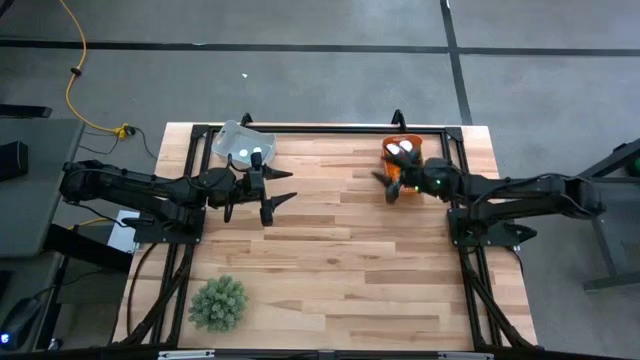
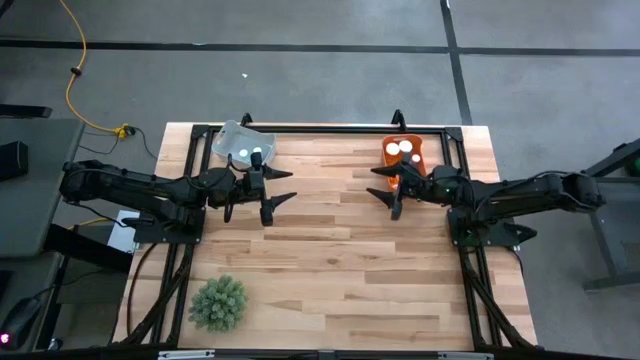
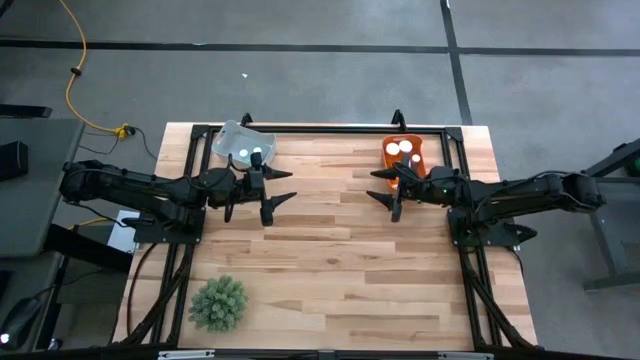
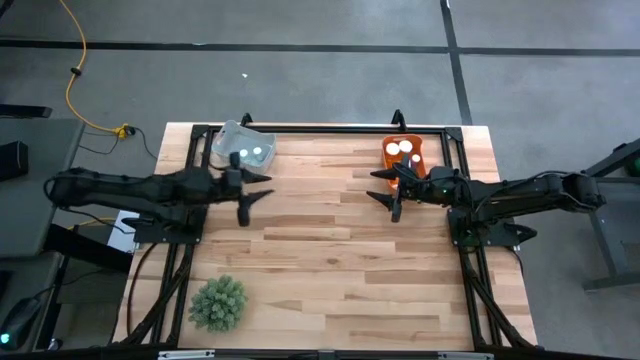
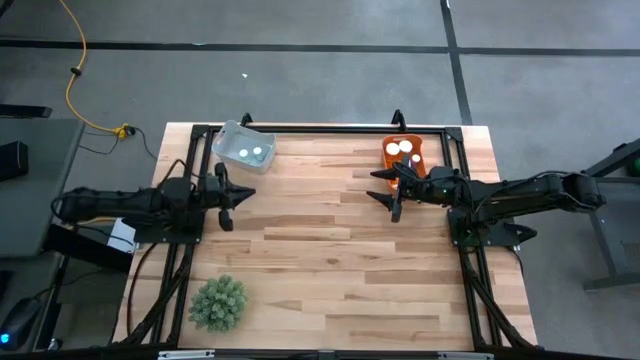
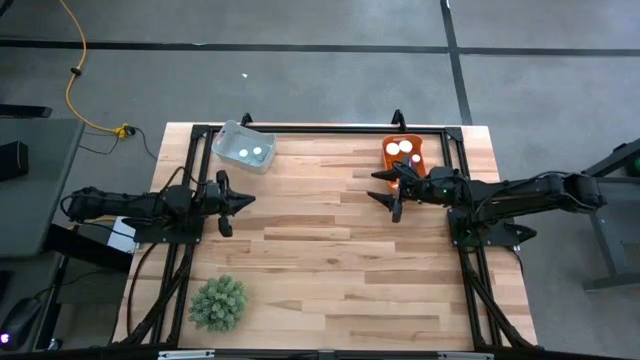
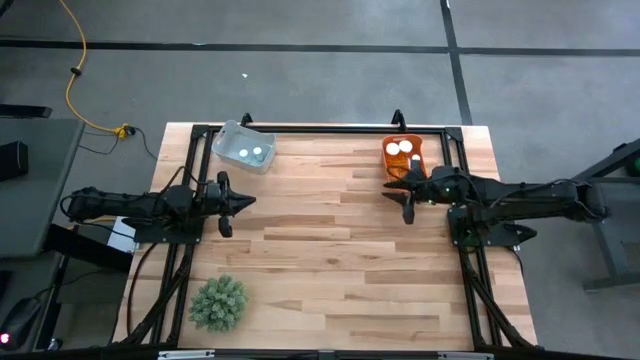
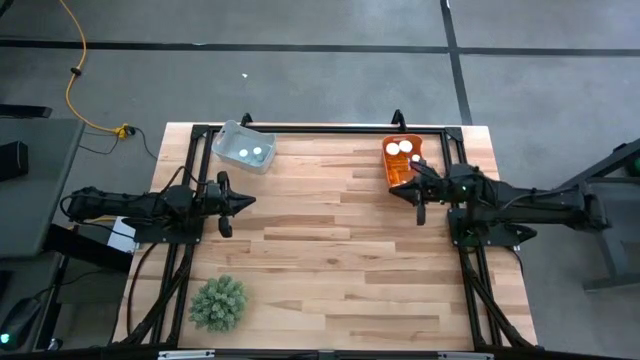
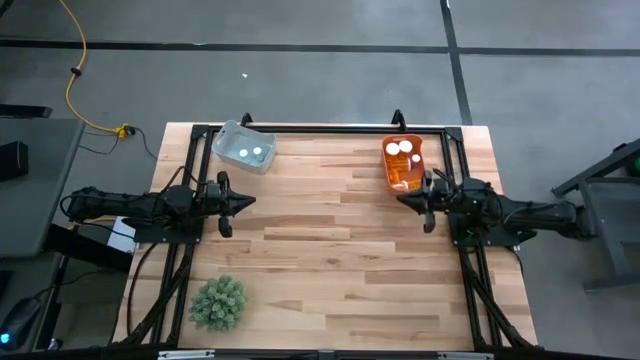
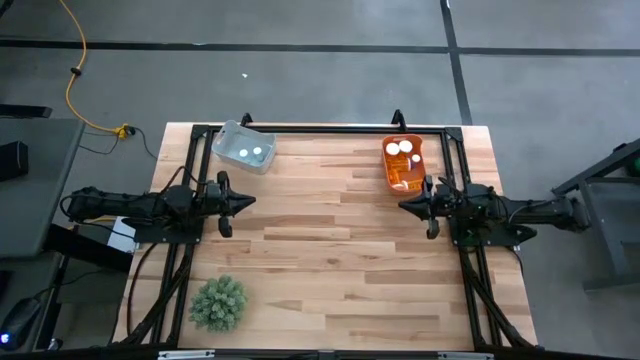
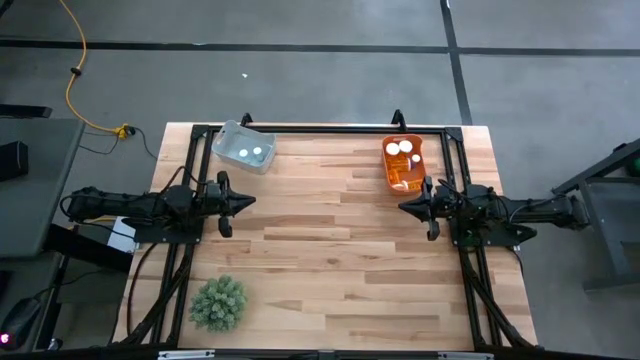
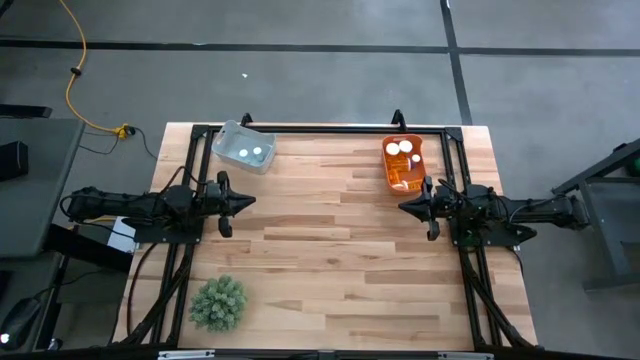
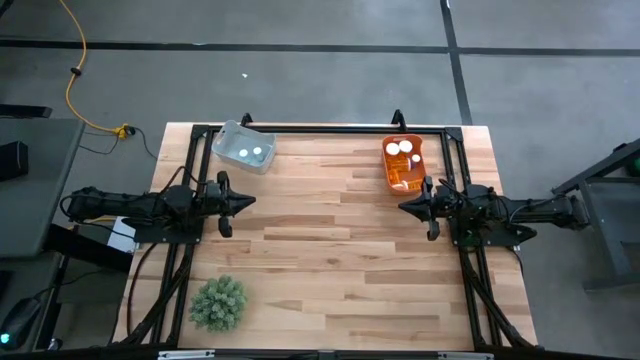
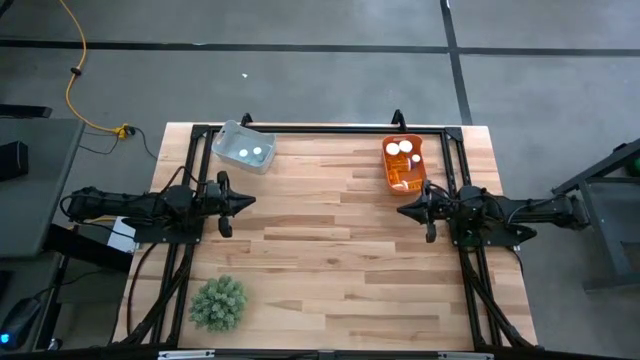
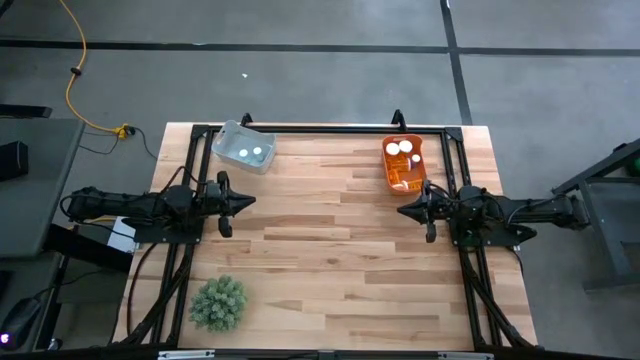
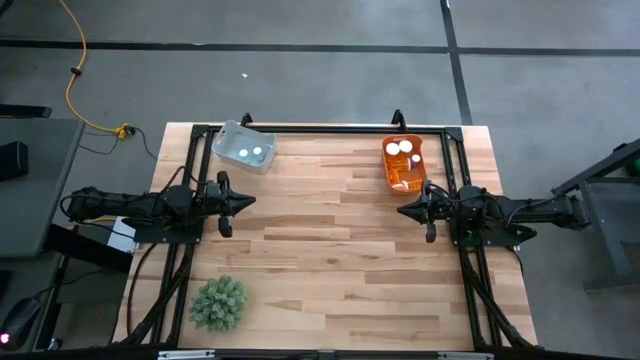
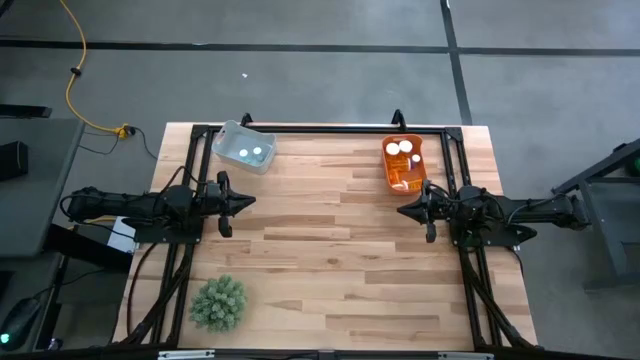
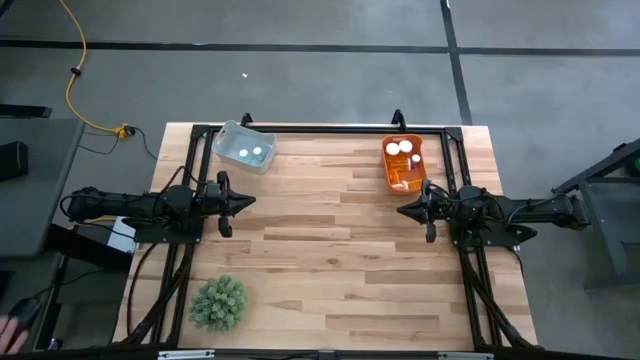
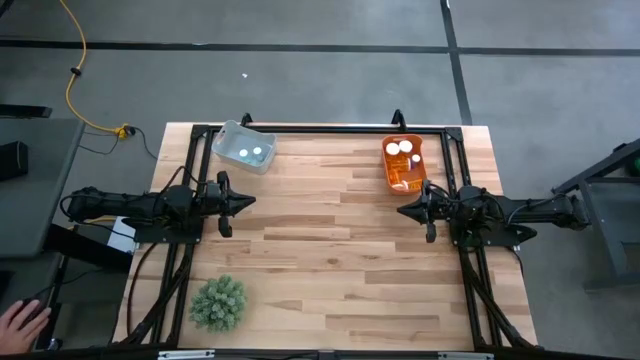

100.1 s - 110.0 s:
Task: Pick and place medicine bottles into bin by pill shape (circle, oval)
Return to Home Position

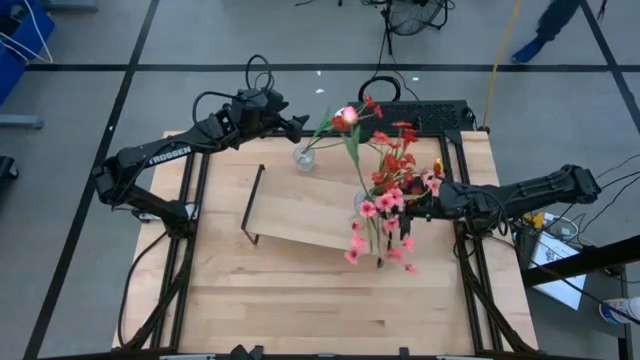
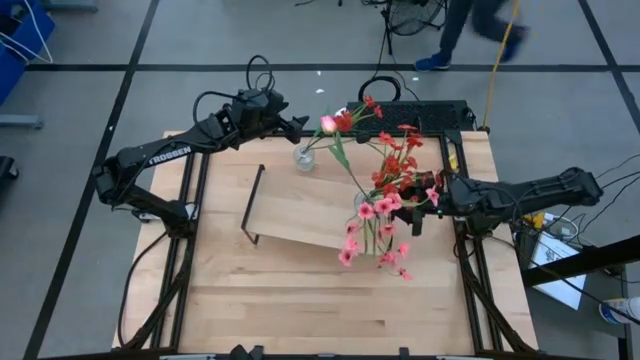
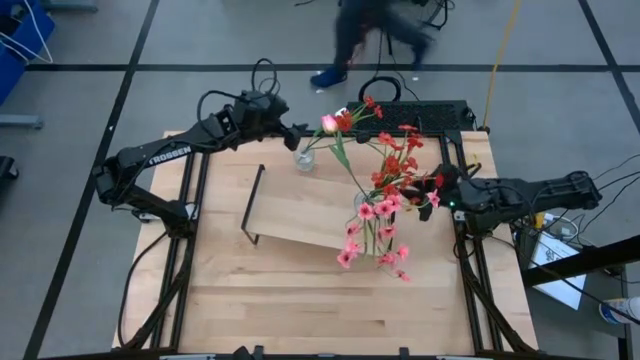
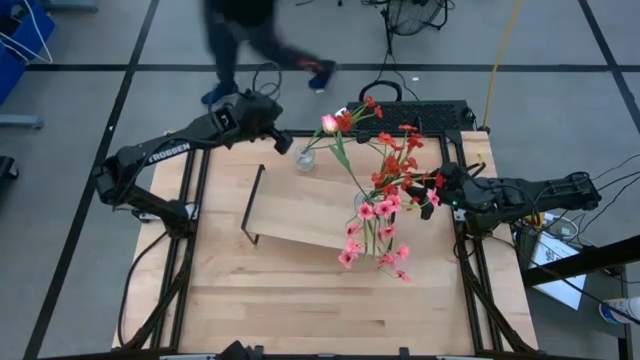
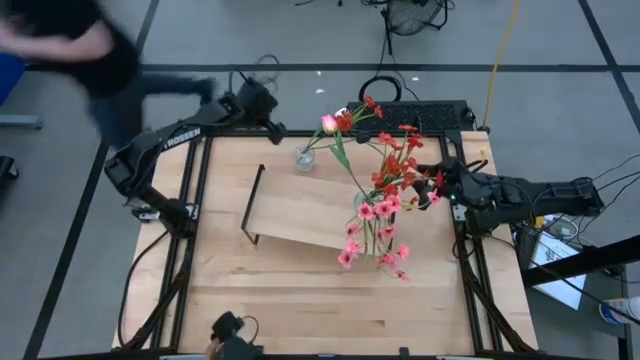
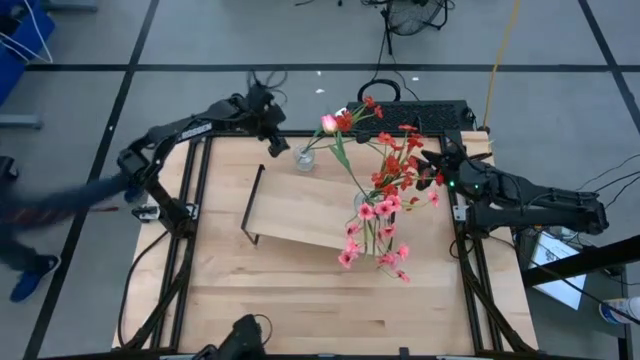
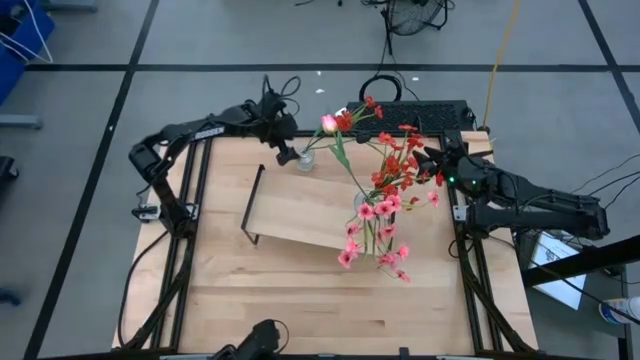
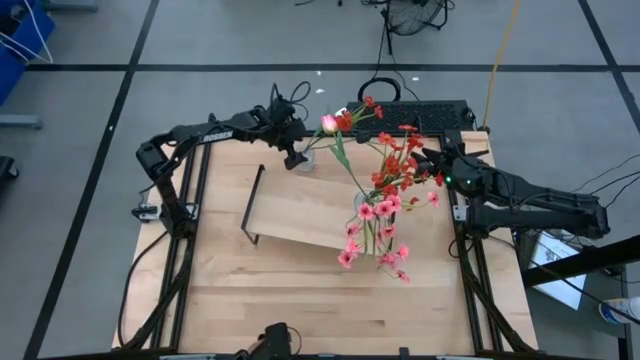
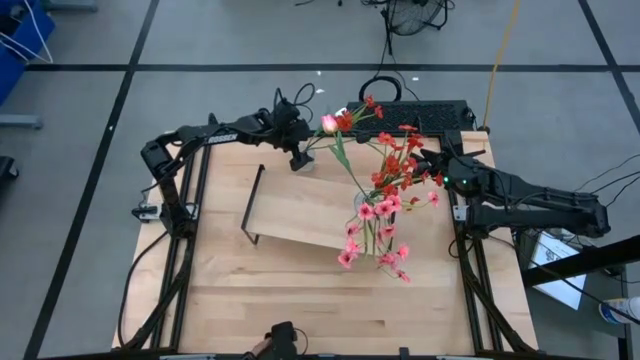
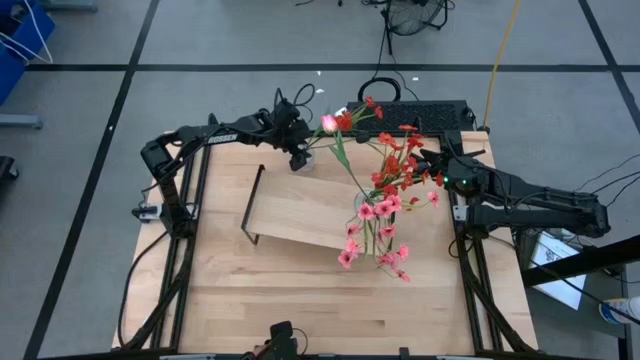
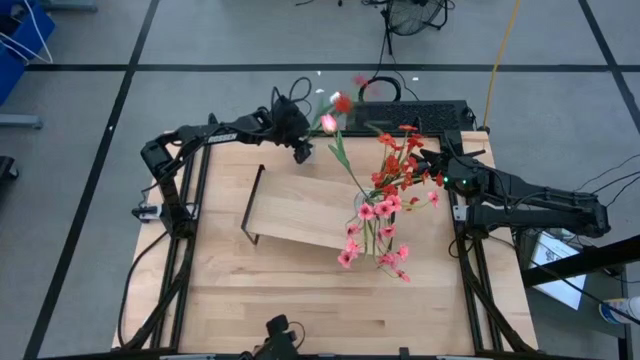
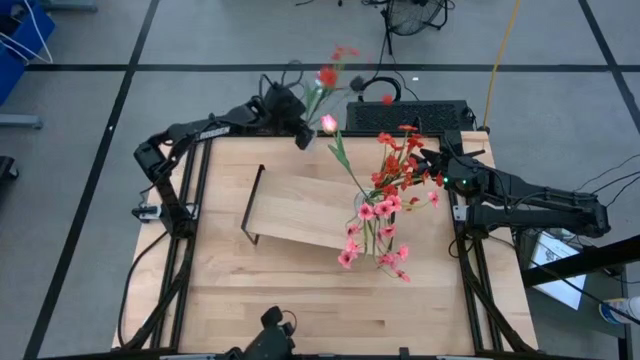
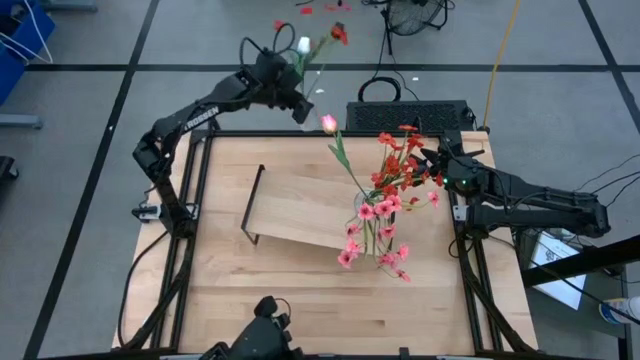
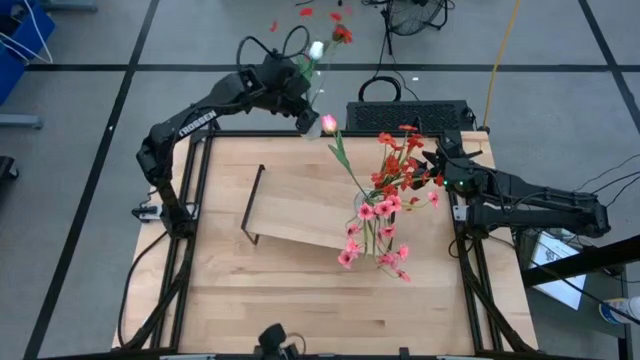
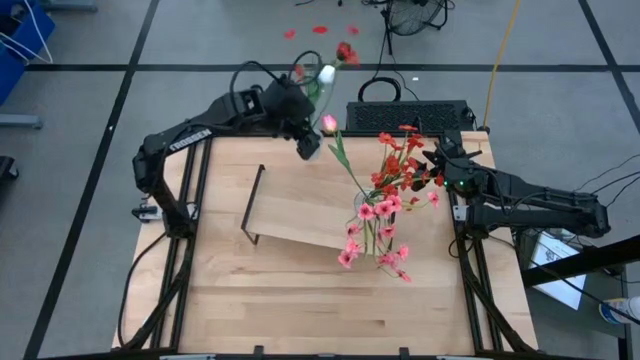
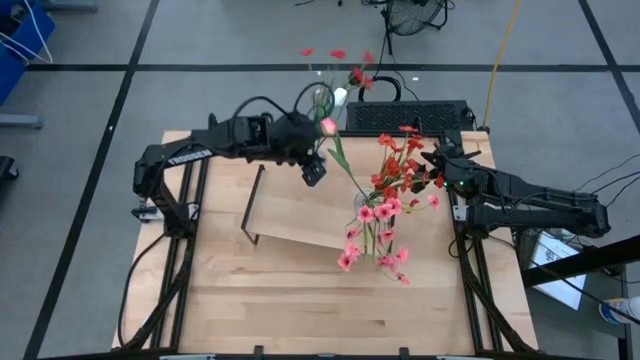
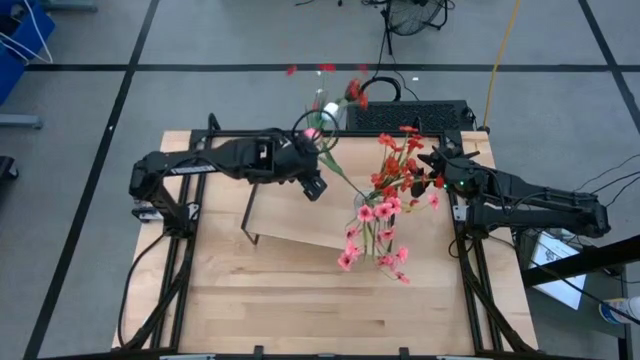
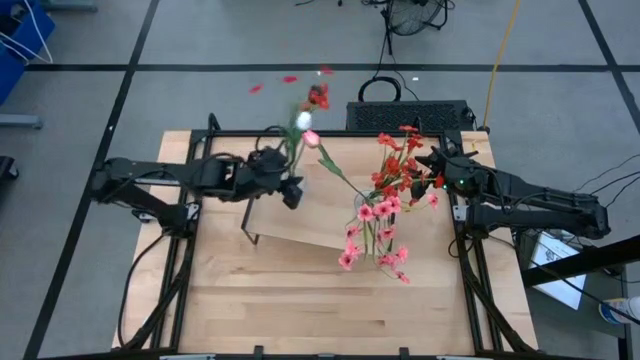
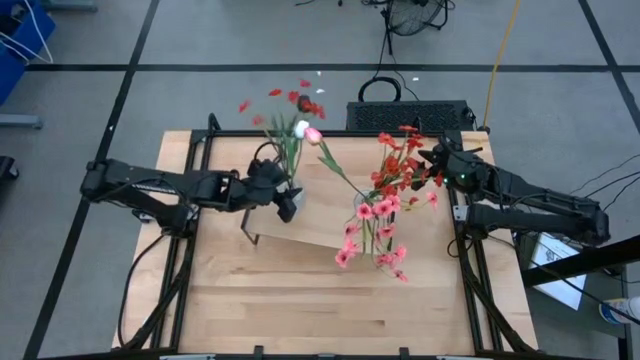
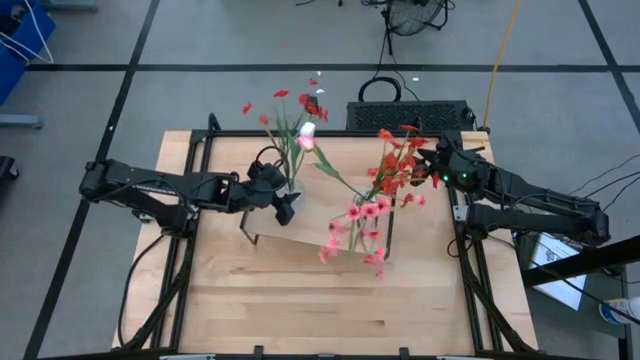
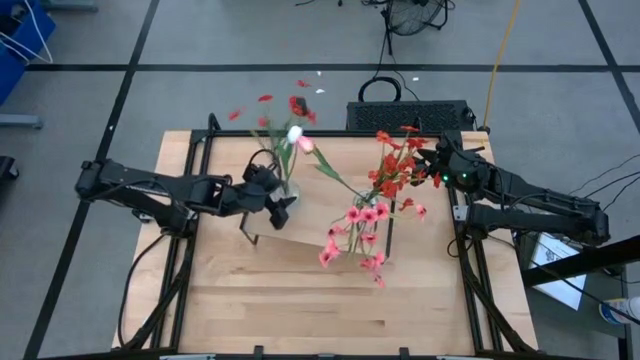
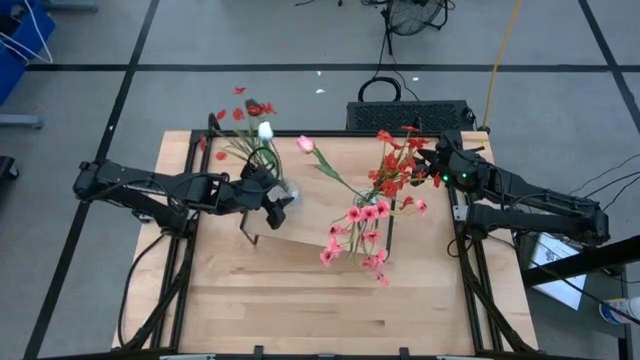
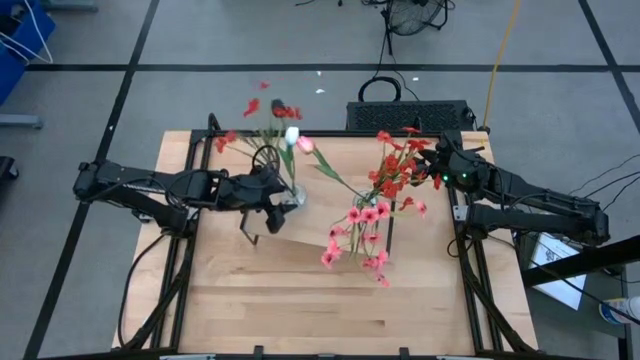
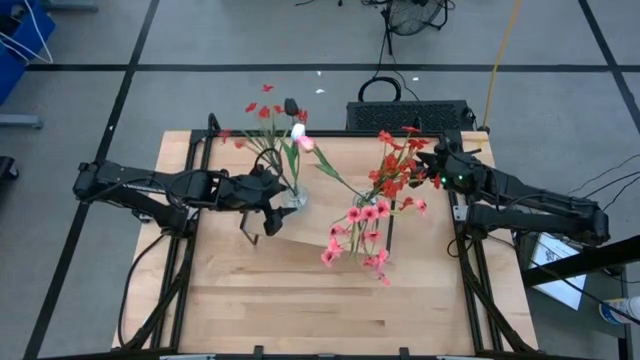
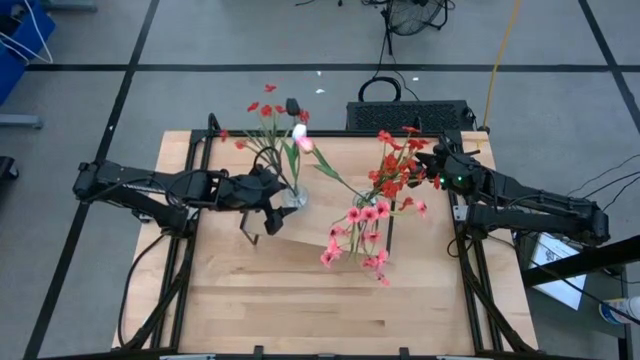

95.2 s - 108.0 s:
Task: Pick and place flowers into a vace then onto a shelf
Put the transparent flower vase on the shelf
